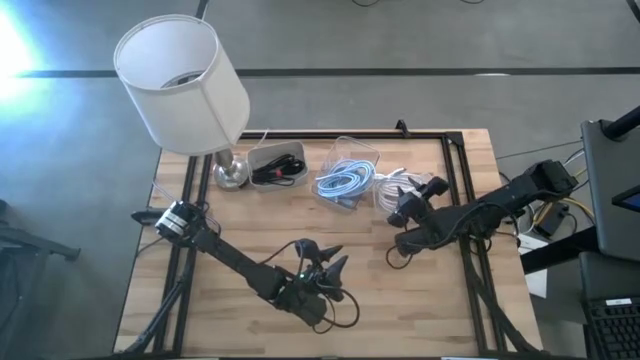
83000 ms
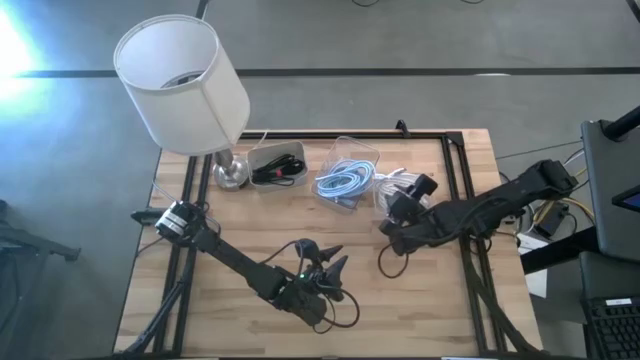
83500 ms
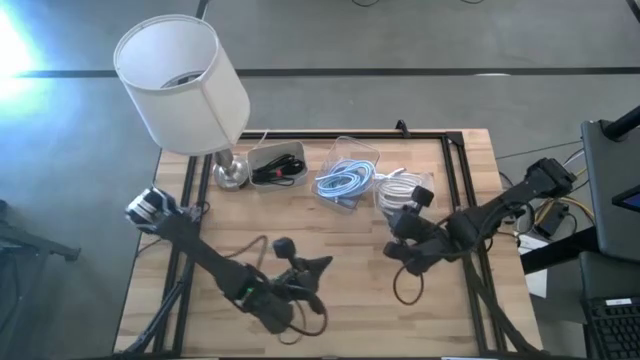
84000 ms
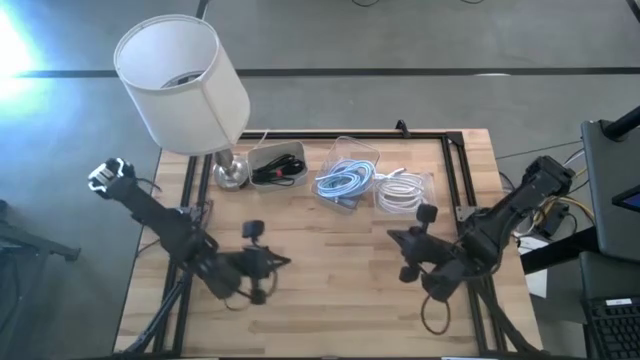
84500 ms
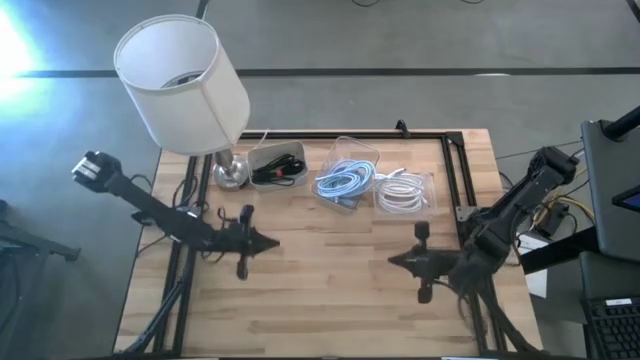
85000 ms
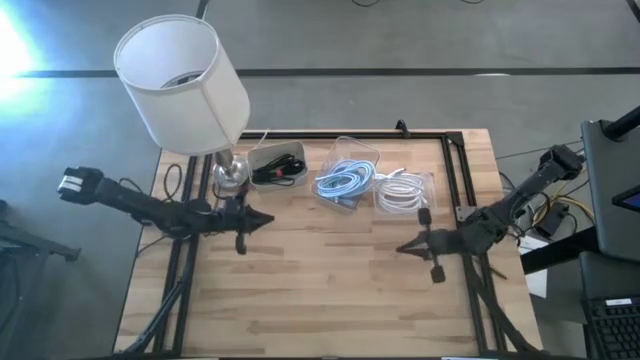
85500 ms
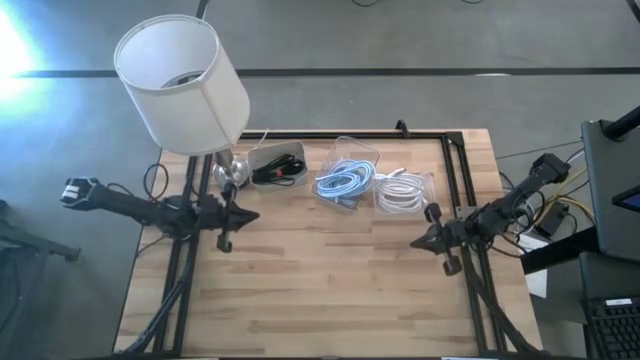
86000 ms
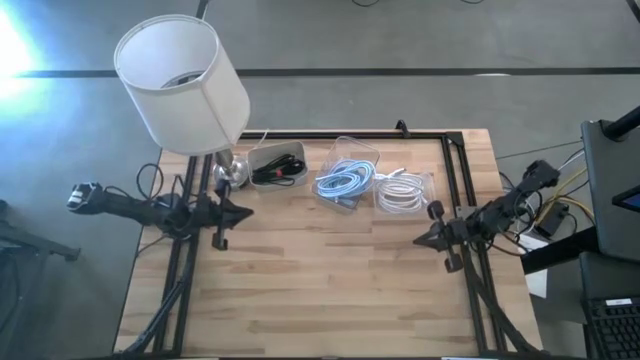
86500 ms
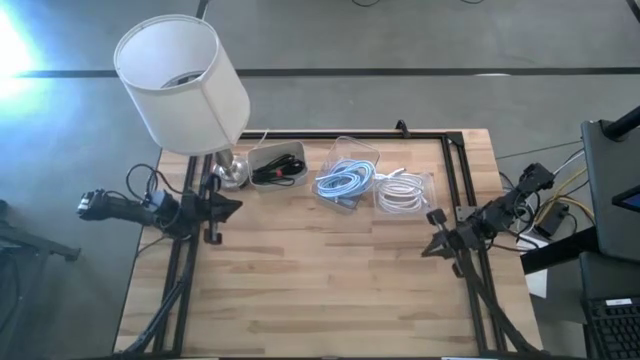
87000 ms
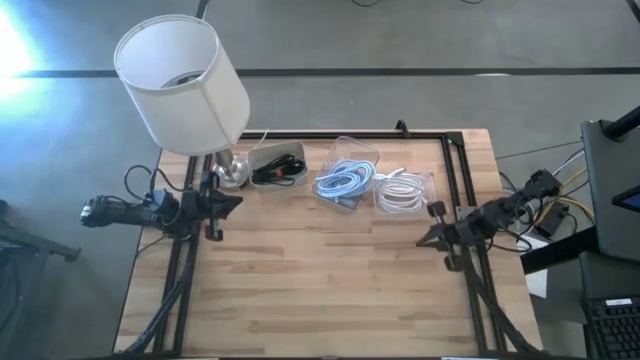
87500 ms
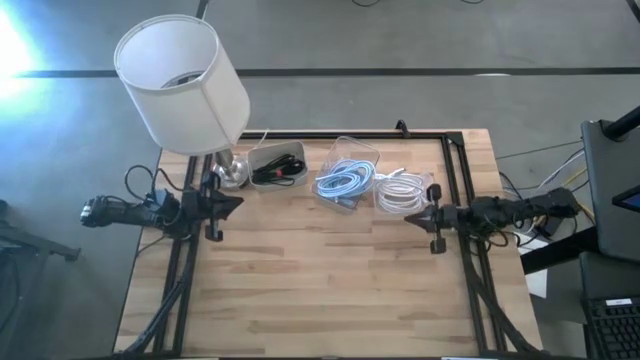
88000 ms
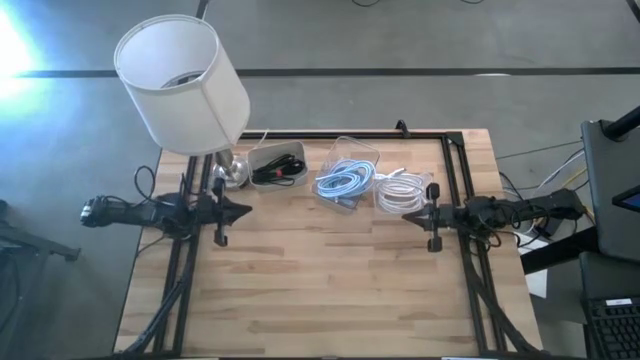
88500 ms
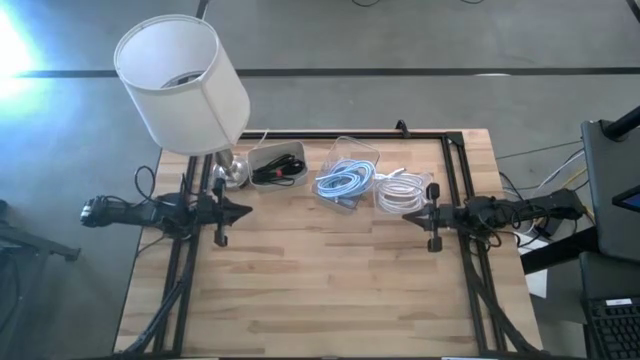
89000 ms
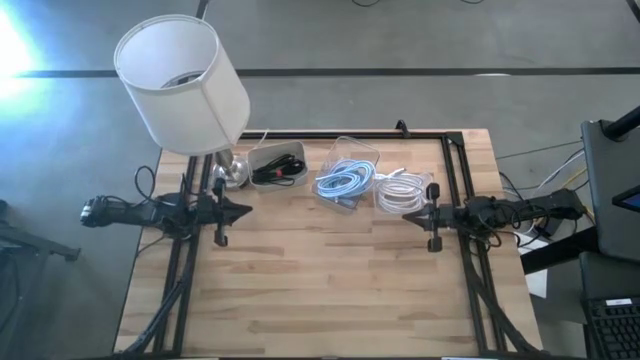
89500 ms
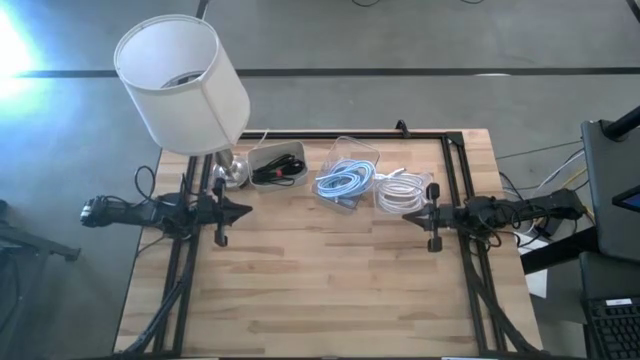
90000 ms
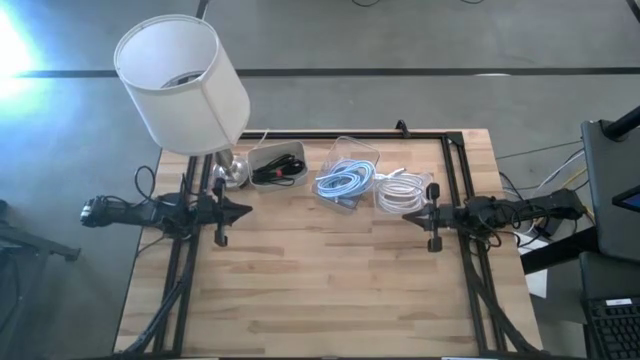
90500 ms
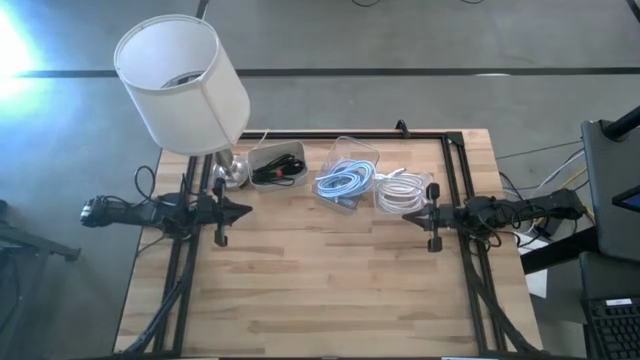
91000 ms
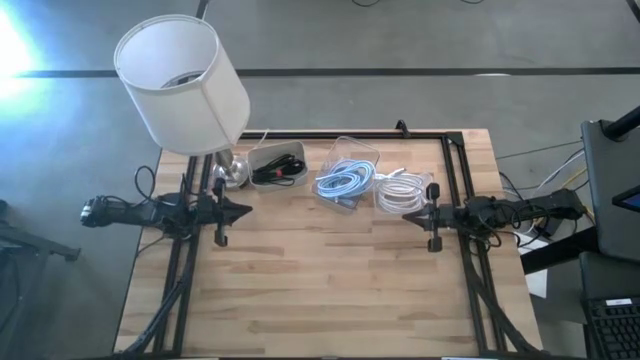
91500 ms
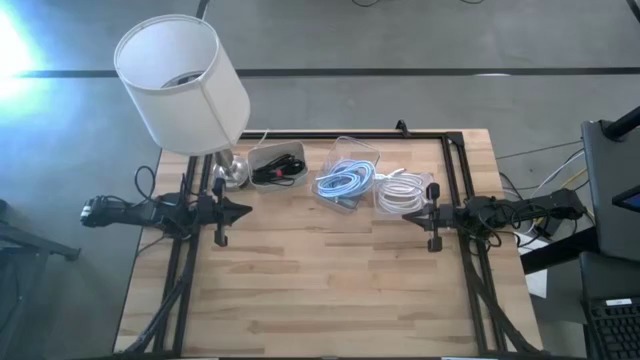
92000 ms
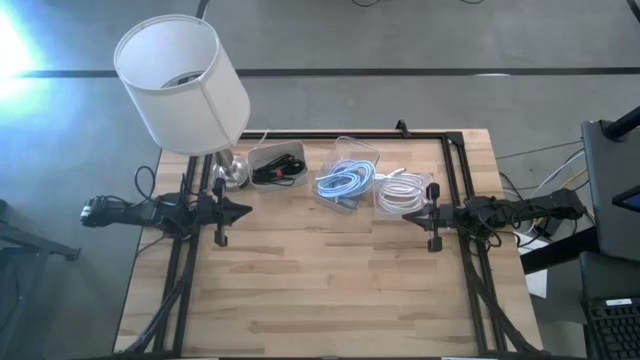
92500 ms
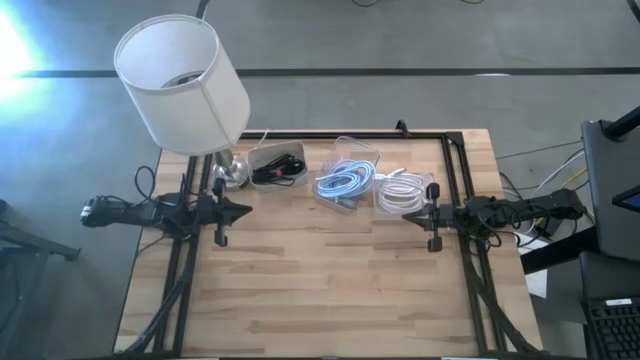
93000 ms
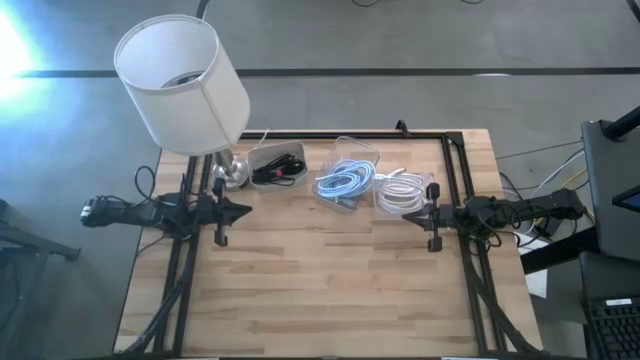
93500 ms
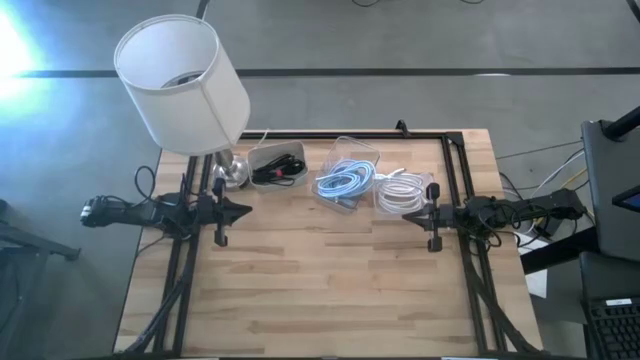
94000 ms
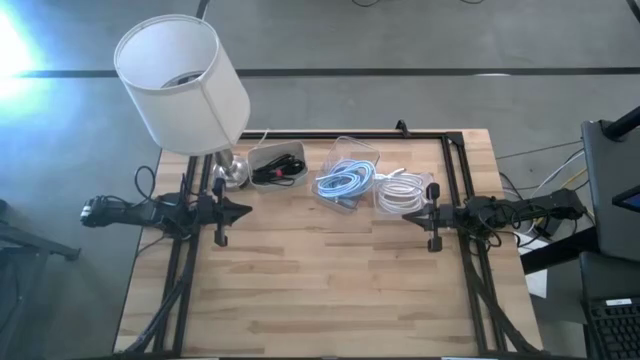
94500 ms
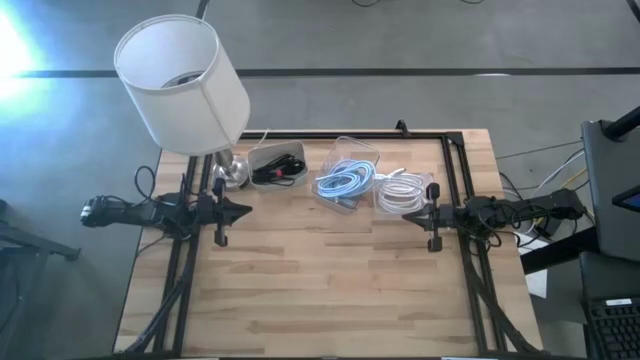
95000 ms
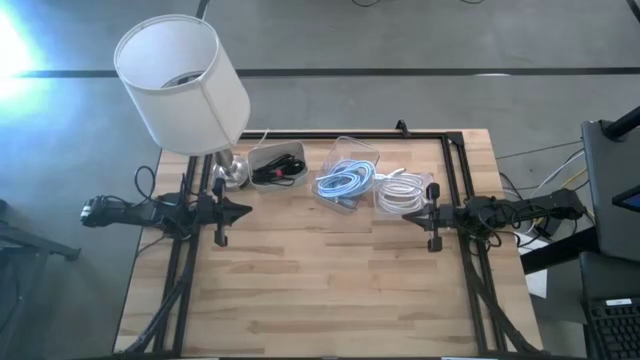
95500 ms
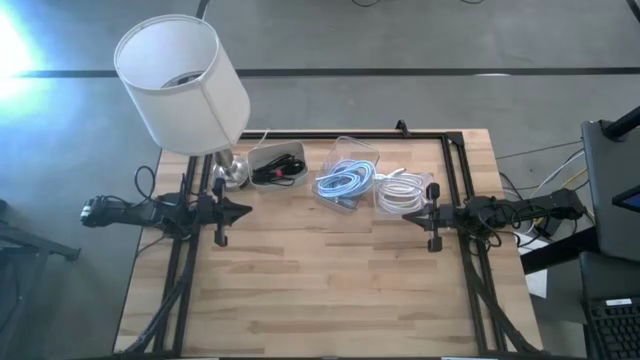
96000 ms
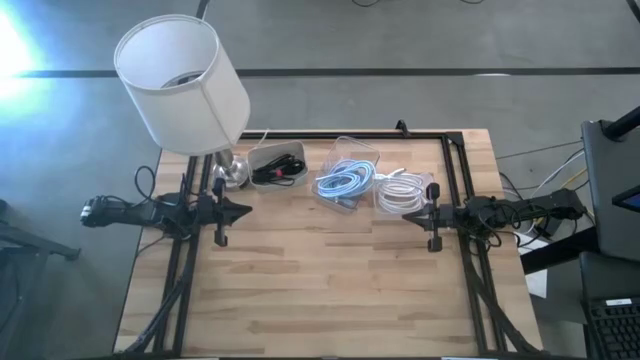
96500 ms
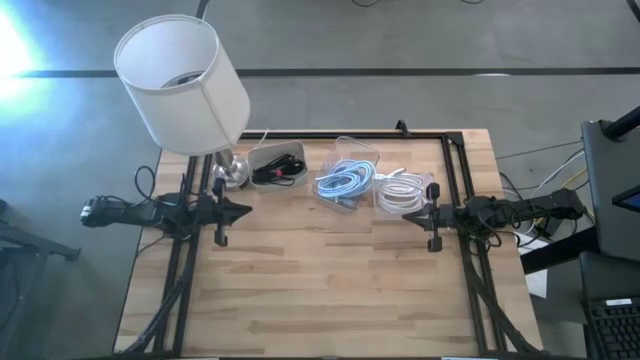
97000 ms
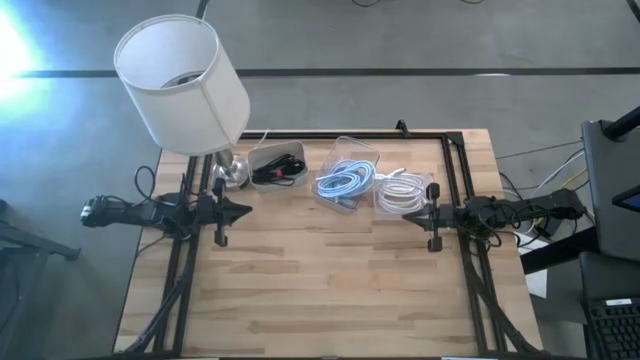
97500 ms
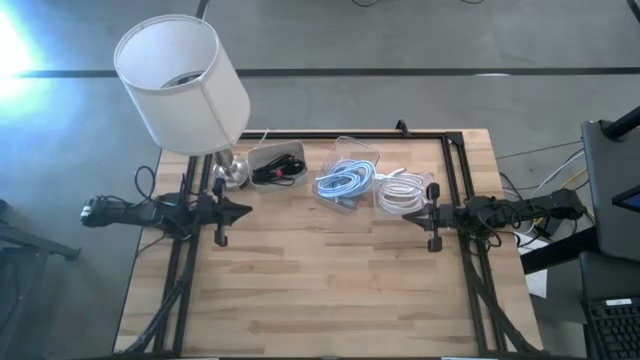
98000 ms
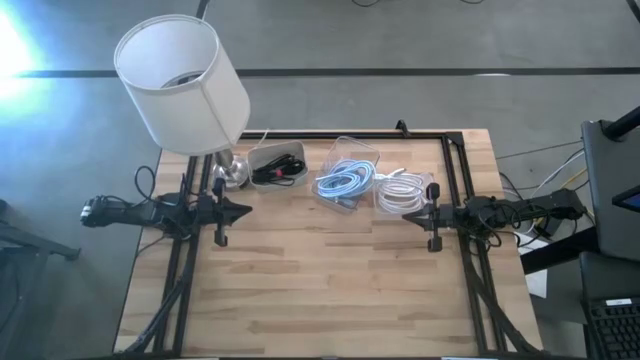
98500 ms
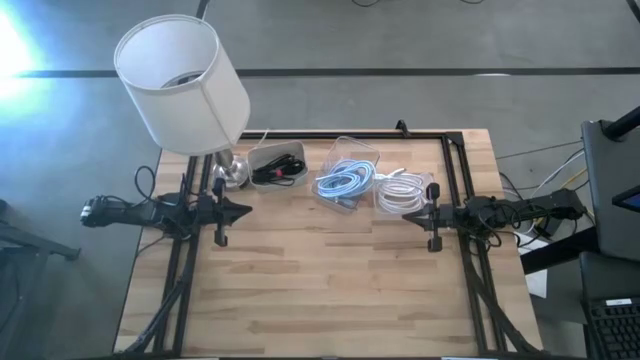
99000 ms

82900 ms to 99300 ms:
Task: Pick & Place USB Port
Return to Home Position

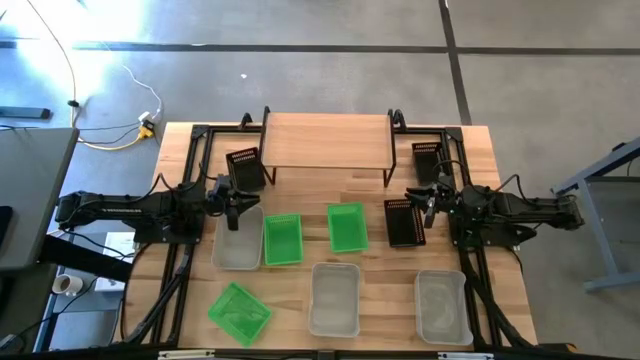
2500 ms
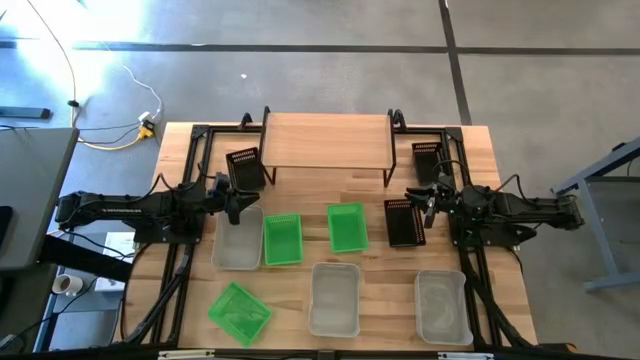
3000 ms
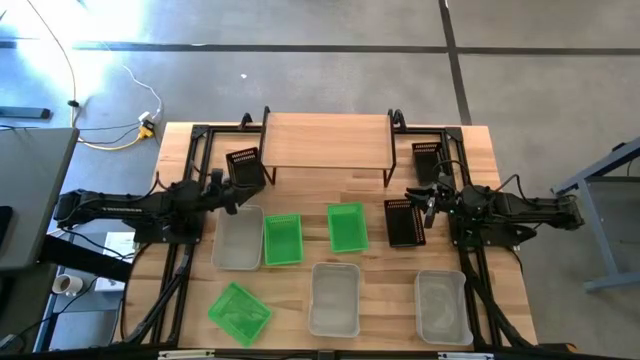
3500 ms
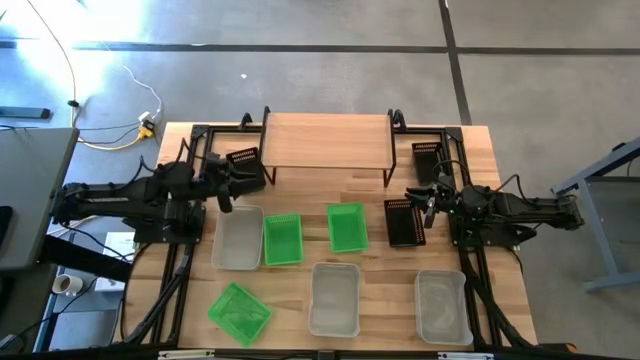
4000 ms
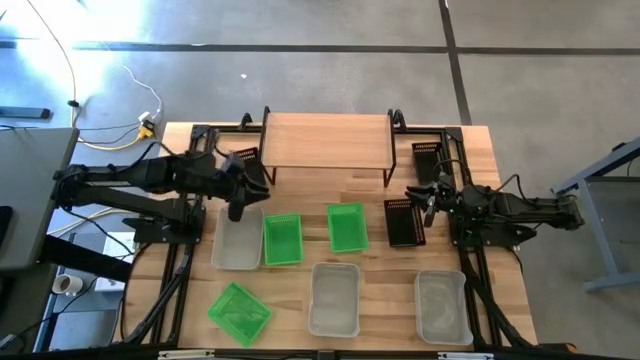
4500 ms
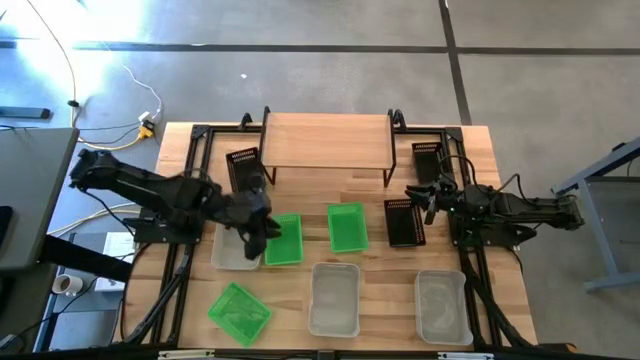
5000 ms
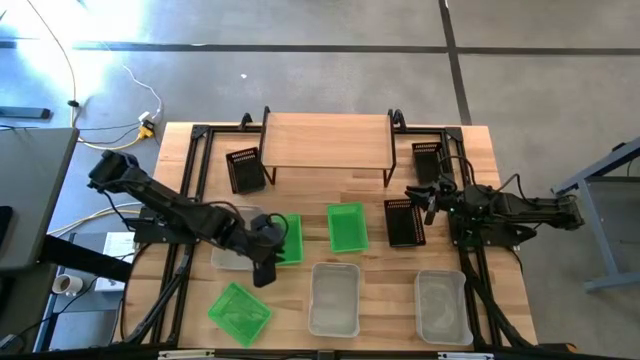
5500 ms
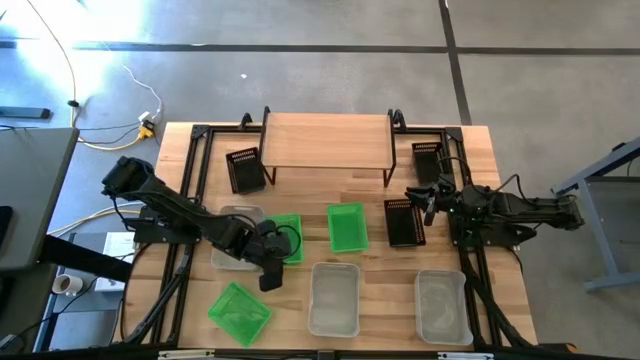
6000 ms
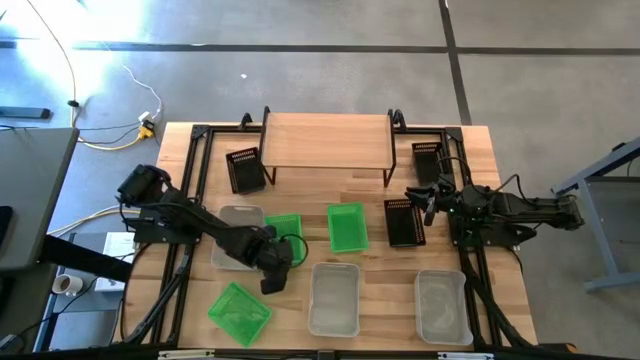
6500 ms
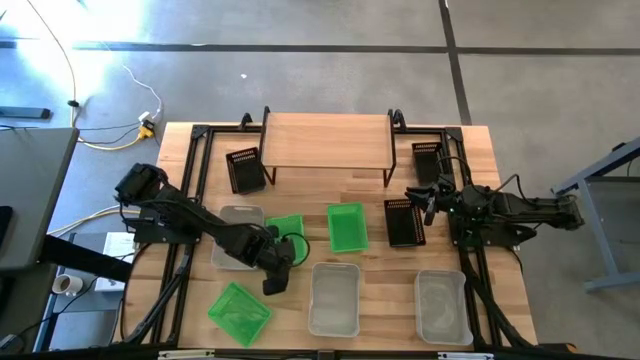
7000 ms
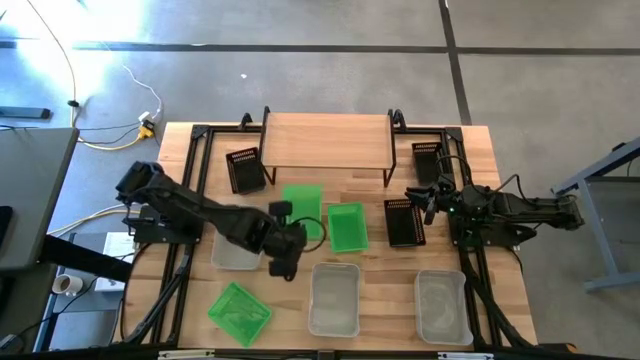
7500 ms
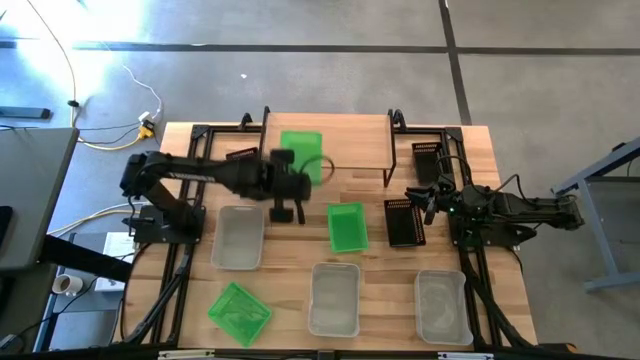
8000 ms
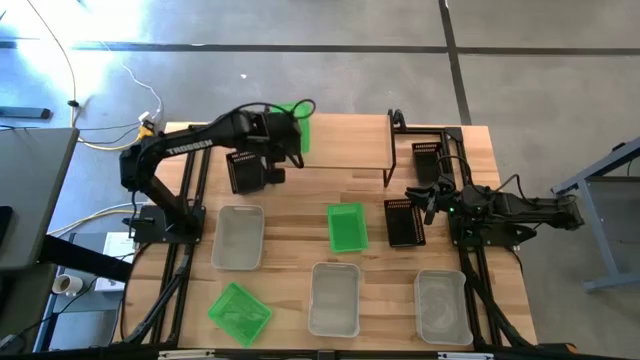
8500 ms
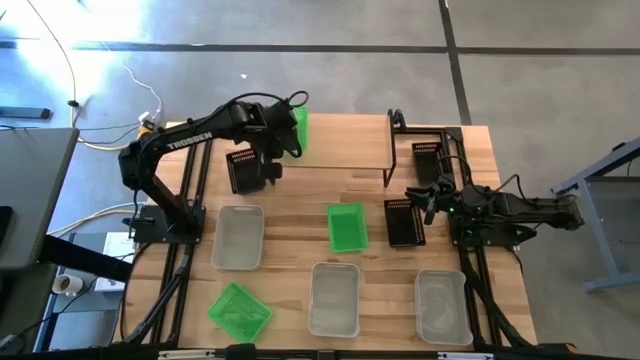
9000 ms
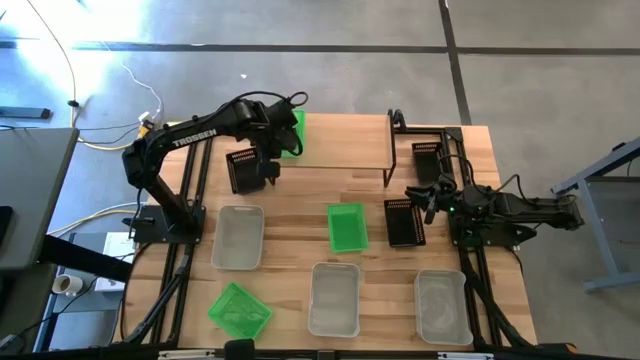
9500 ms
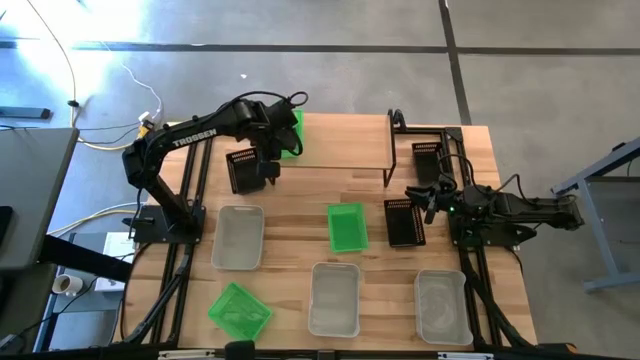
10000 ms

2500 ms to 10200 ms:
Task: Stack baskets on shelf by color
Put the middle green bin on the shelf
